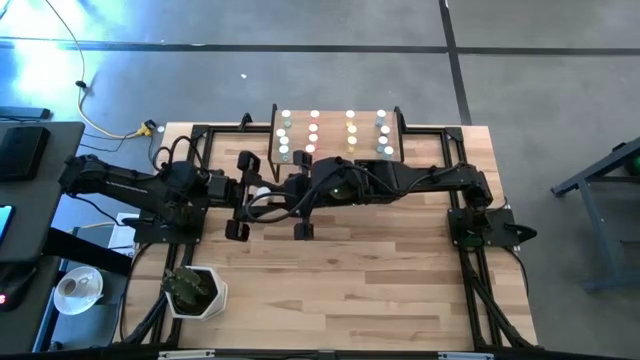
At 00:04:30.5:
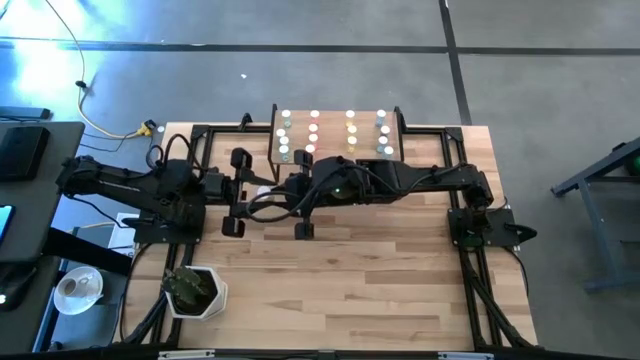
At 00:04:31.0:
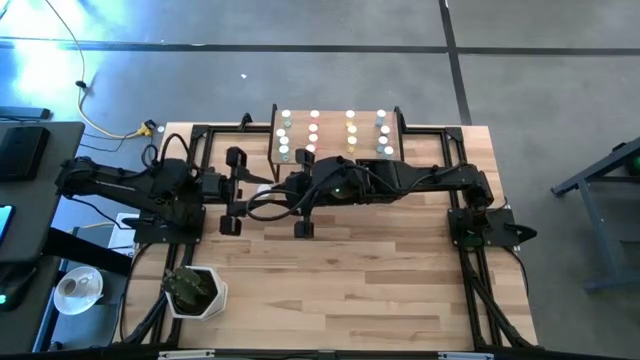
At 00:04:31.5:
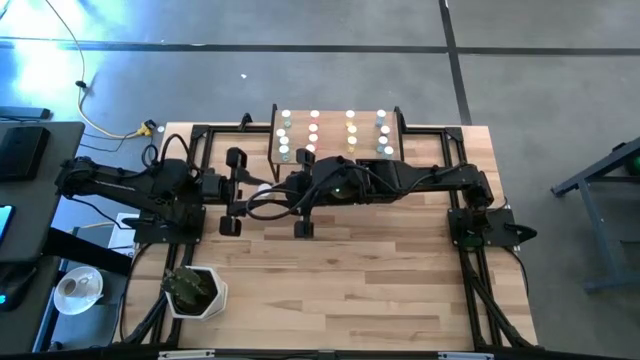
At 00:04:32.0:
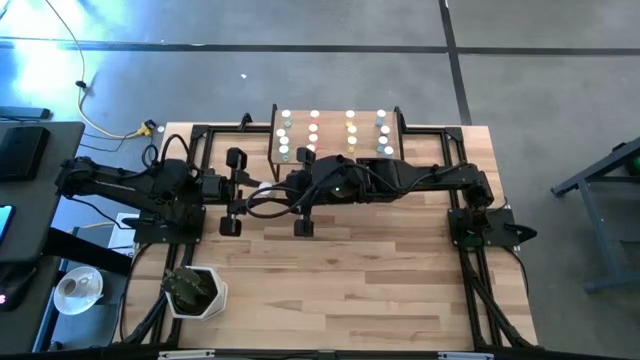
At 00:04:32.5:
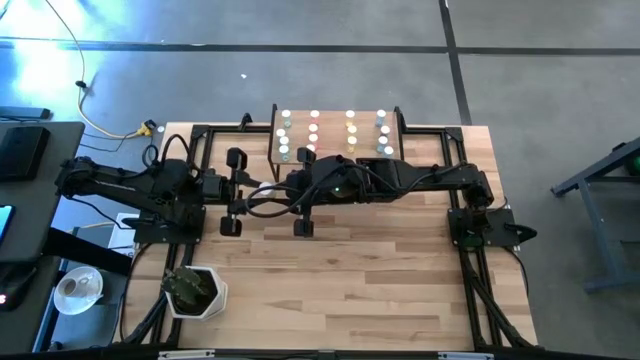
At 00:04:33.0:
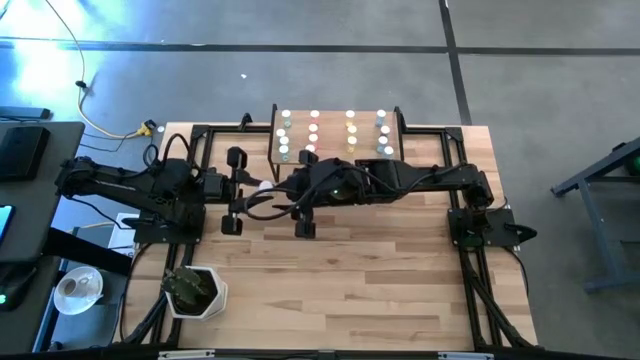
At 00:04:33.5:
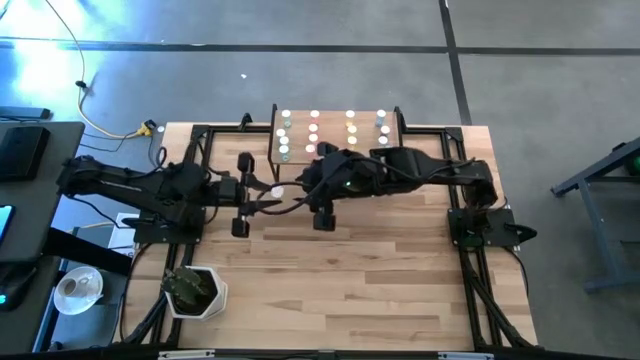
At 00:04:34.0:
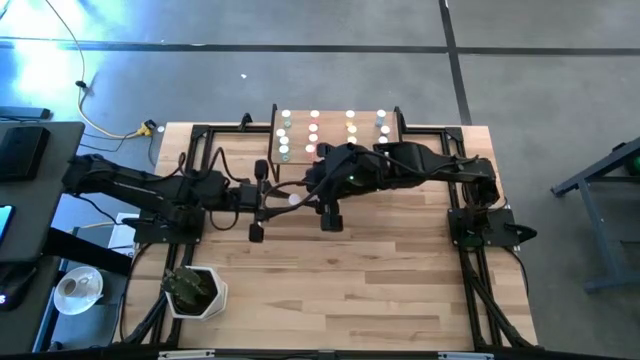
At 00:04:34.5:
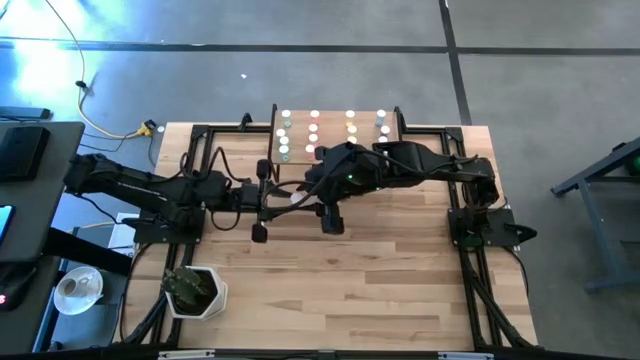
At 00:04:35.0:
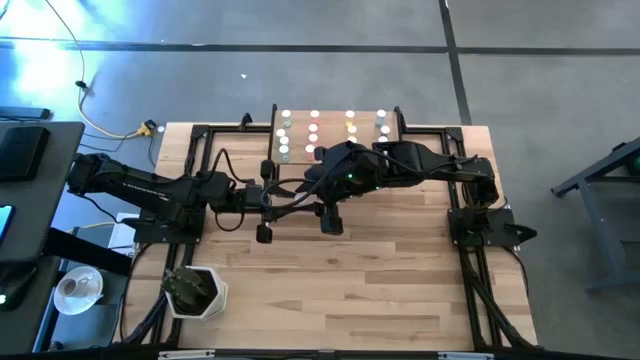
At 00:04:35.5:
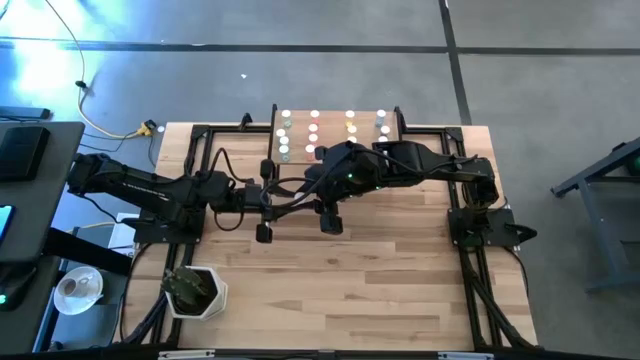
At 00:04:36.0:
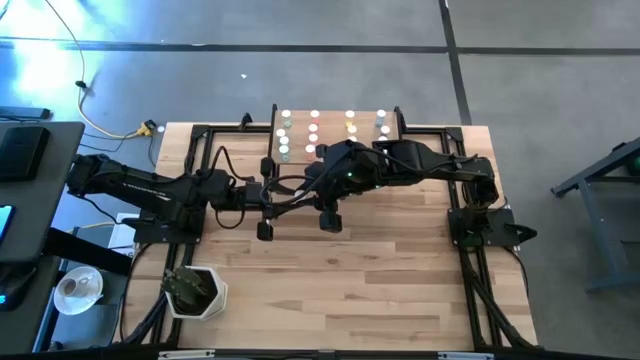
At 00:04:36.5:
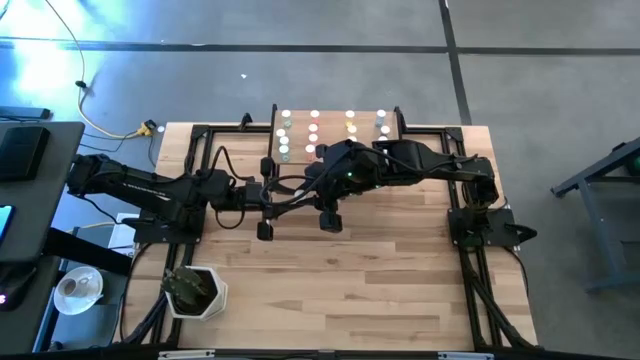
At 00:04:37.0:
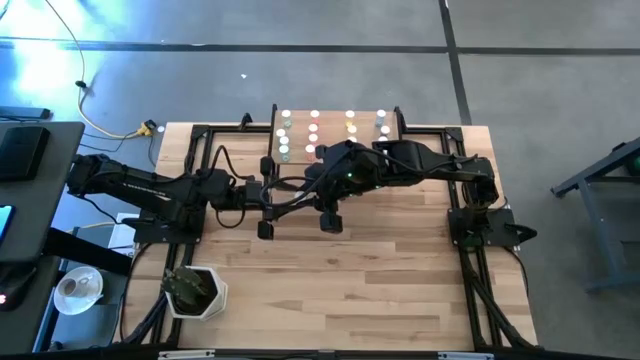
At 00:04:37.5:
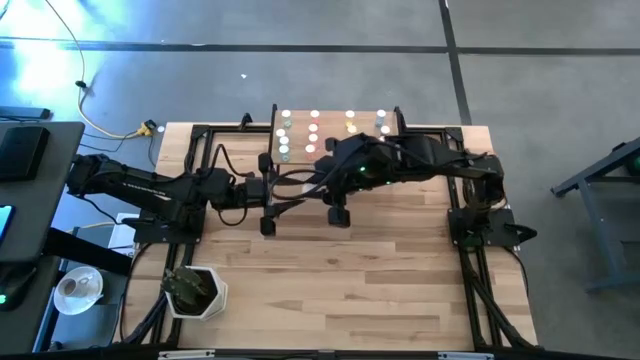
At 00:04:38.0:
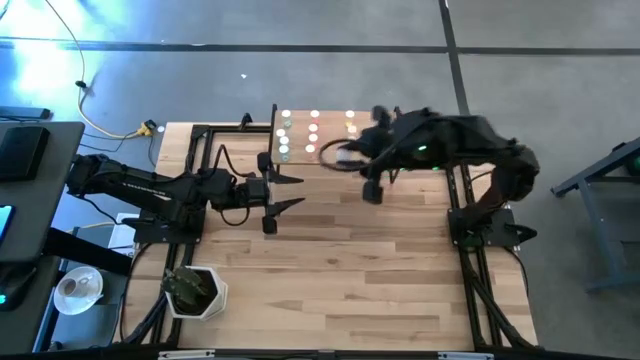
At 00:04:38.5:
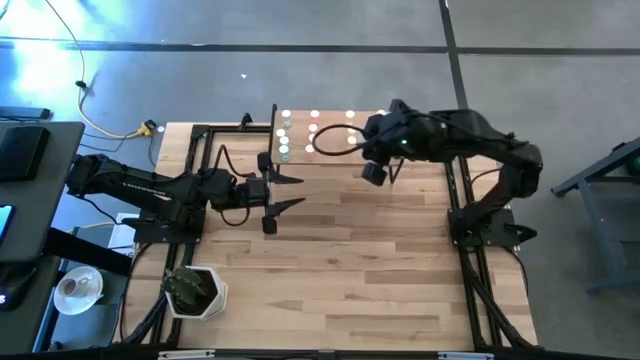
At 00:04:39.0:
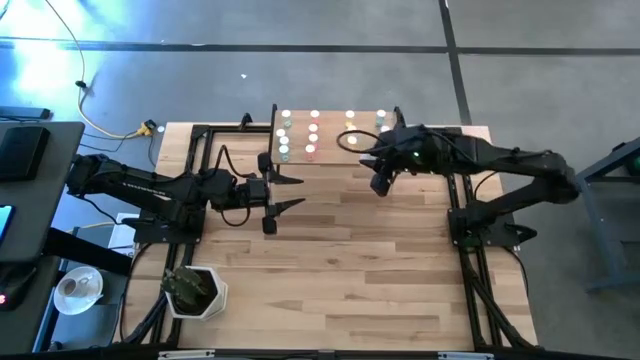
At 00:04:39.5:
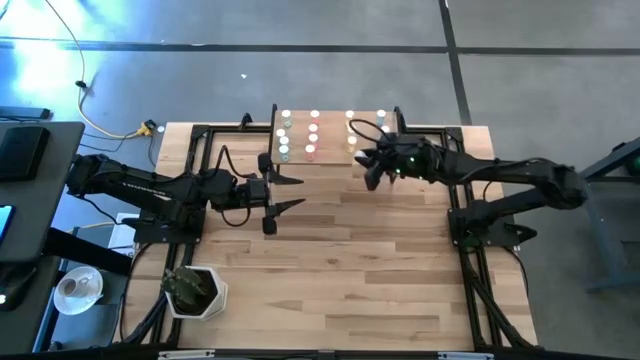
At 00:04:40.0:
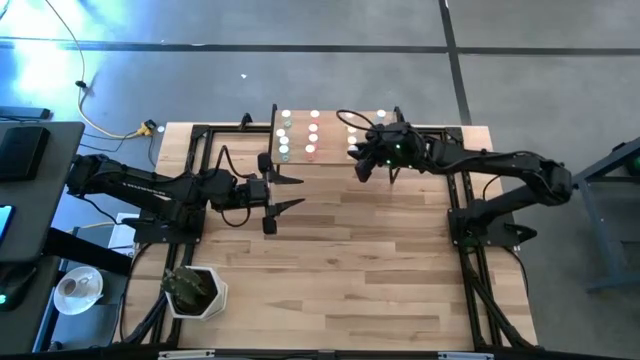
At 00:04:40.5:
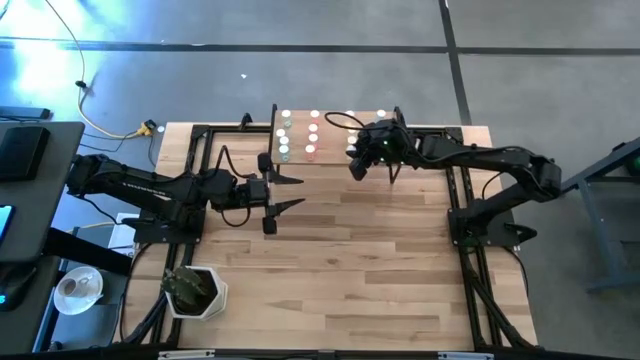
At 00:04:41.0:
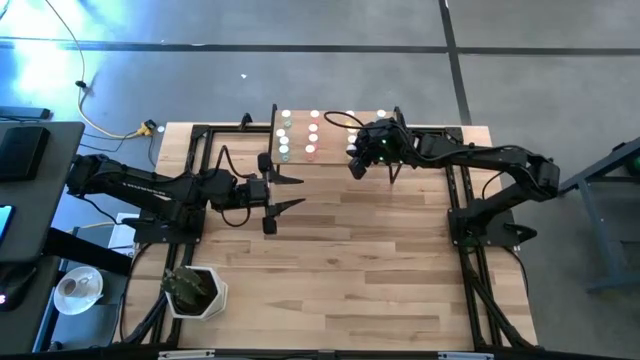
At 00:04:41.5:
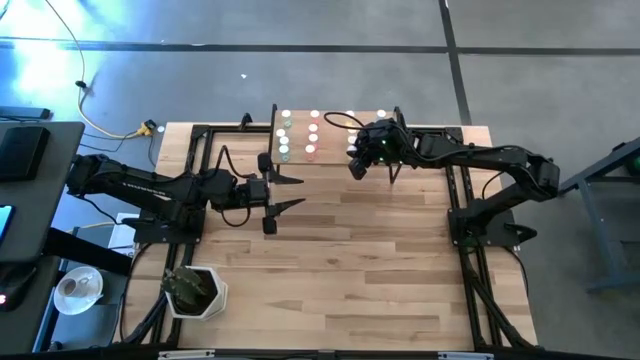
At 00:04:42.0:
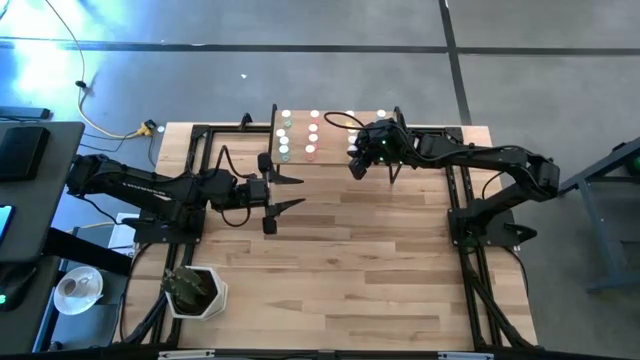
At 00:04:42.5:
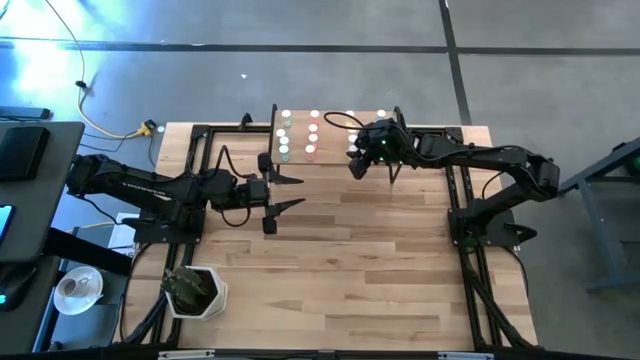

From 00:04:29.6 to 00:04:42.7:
Task: Pick and place medicine bottles onto shelf by color
Put the yellow pill bottle on the shelf

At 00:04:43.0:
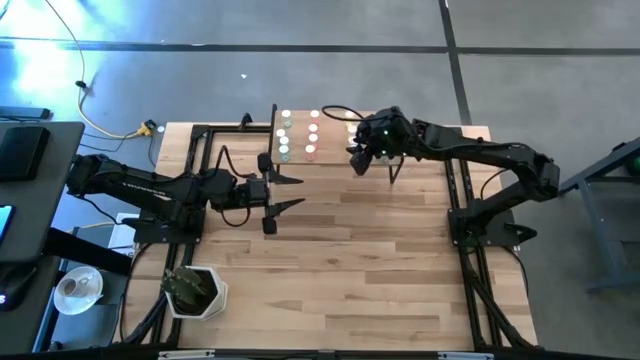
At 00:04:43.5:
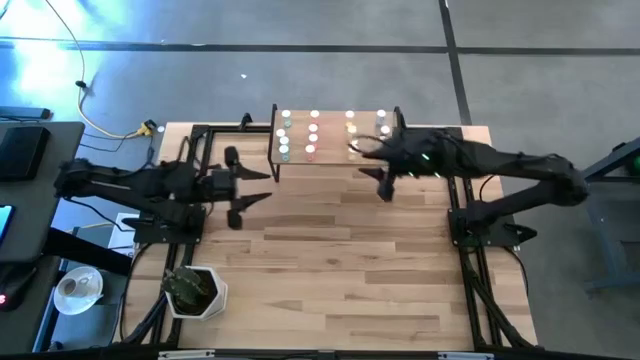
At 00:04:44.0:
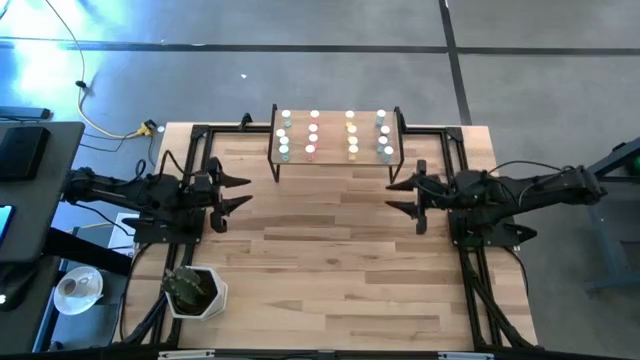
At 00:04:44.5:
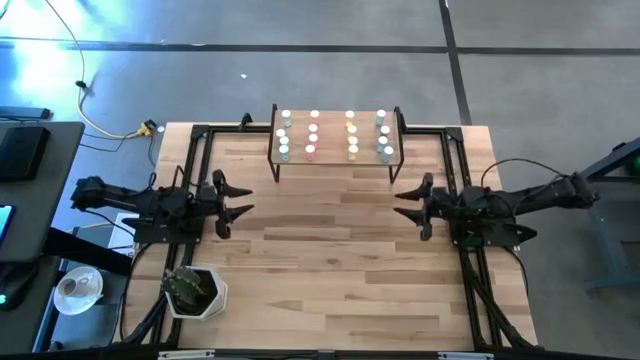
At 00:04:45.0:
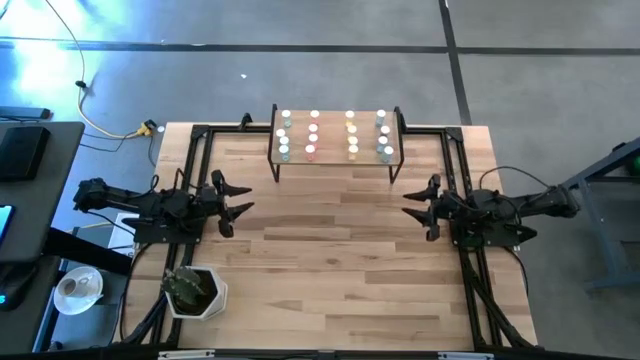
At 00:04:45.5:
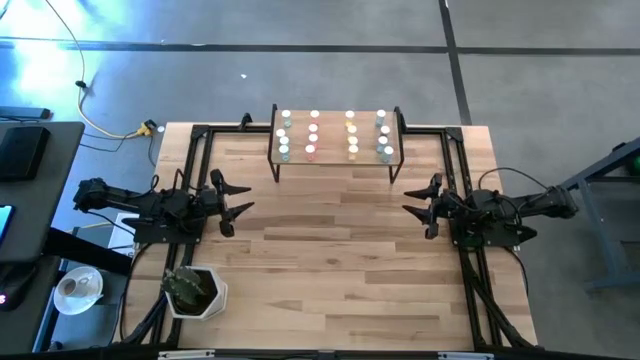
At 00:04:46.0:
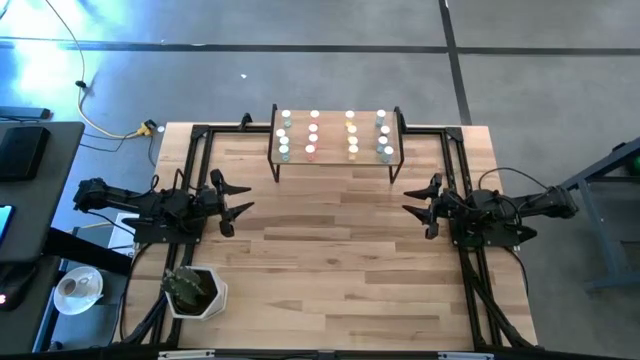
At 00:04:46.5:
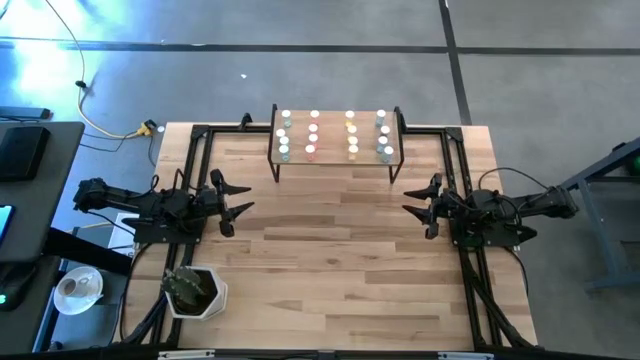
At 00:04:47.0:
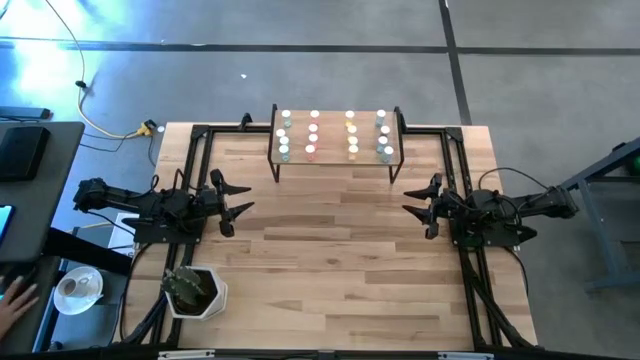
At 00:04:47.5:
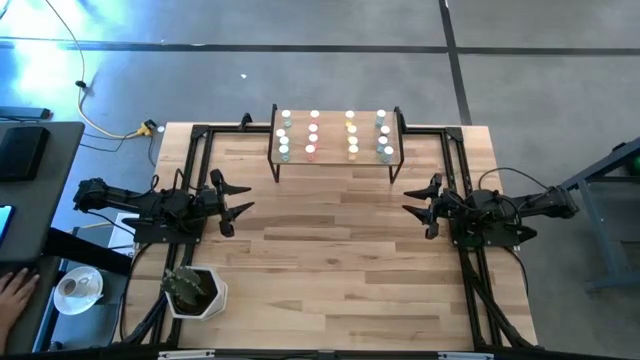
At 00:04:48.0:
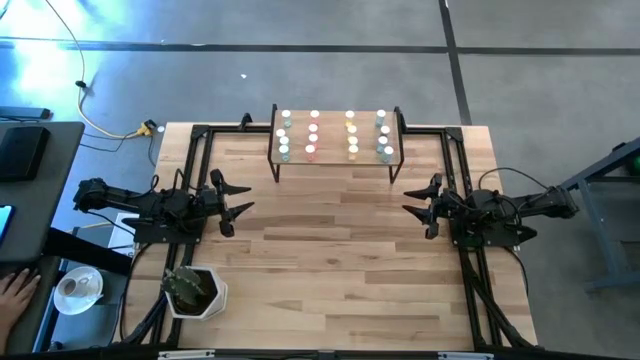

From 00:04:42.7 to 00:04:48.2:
Return to Home Position

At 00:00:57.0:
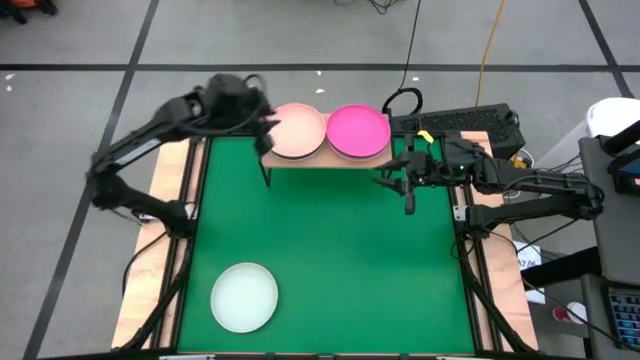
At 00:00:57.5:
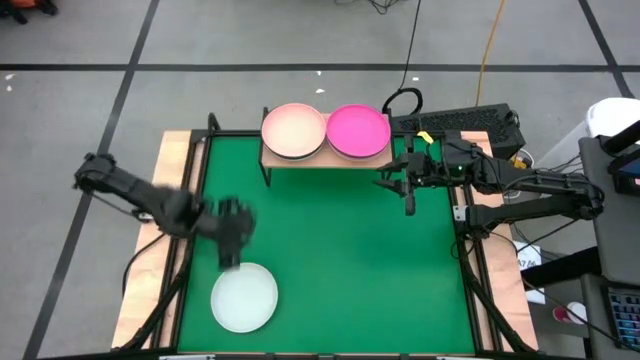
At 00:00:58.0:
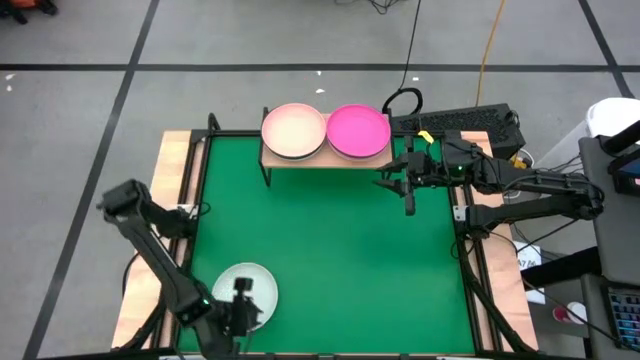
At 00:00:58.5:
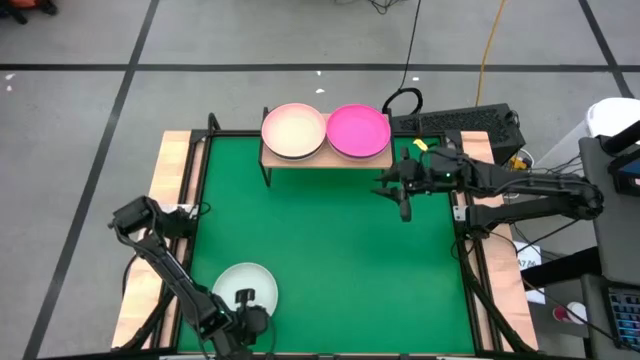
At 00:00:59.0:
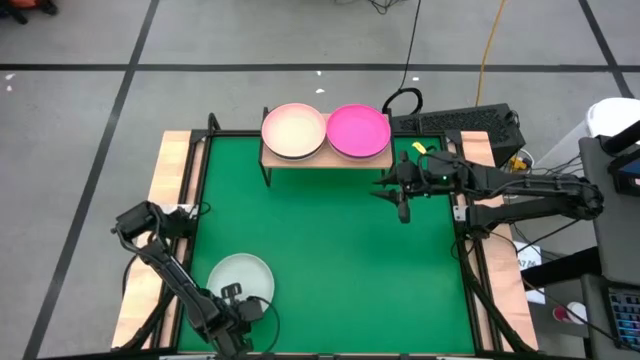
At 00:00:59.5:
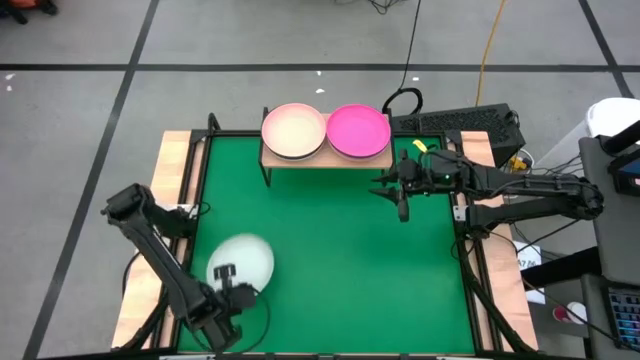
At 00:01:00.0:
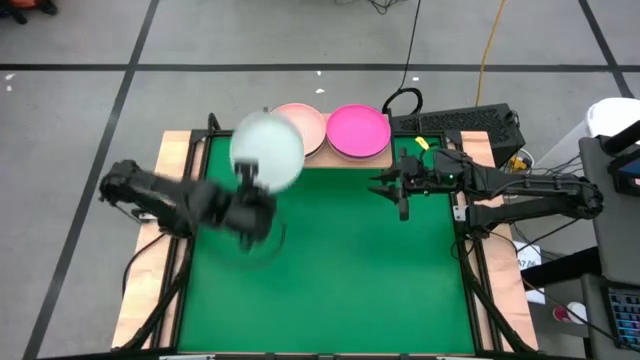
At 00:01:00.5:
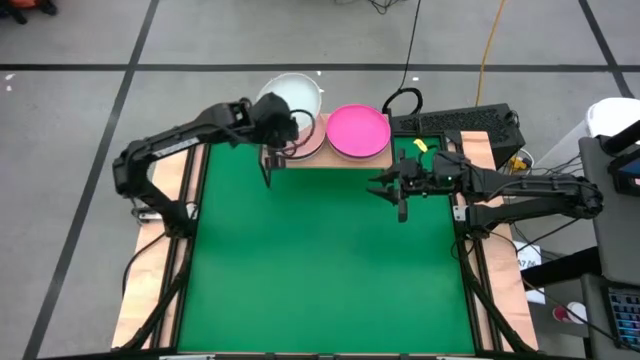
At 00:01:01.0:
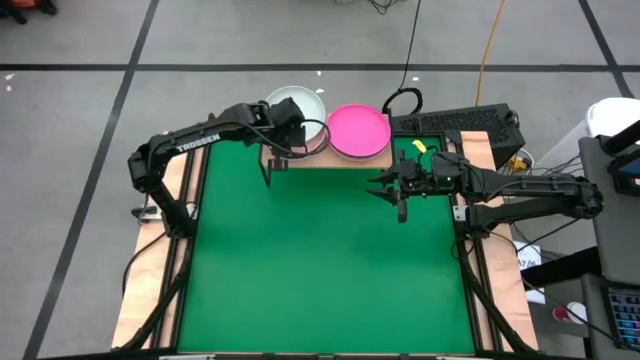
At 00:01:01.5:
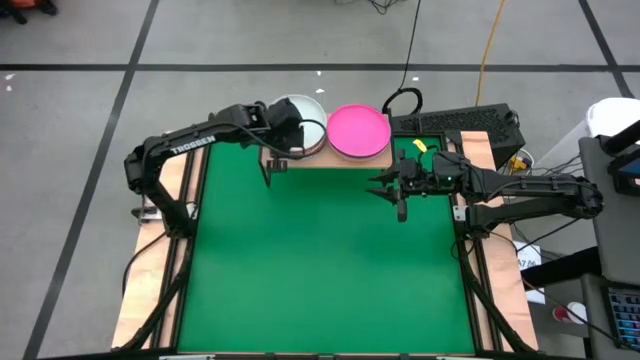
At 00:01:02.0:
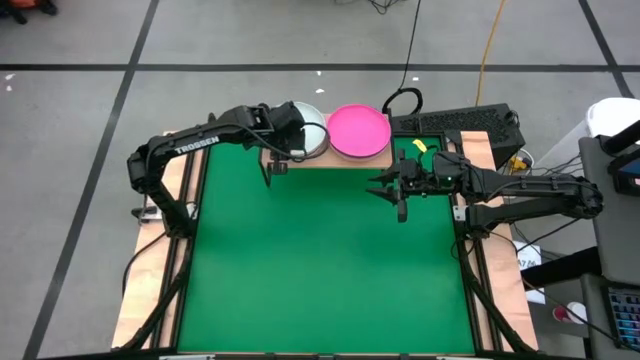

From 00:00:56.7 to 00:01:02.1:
Task: Place and stack plates onto a shelf
Stack the white plate on the light orange plate on the shelf
